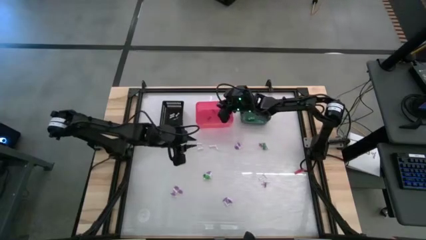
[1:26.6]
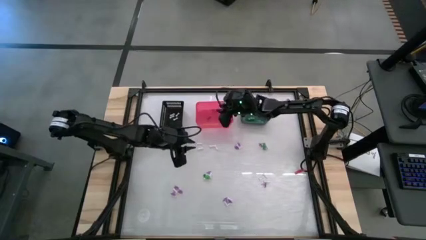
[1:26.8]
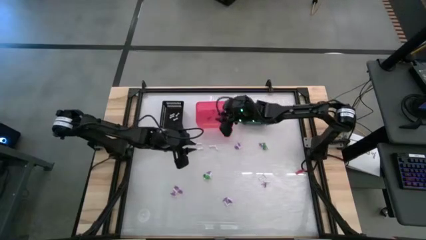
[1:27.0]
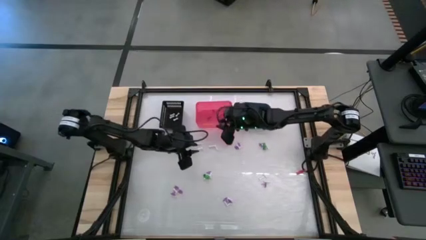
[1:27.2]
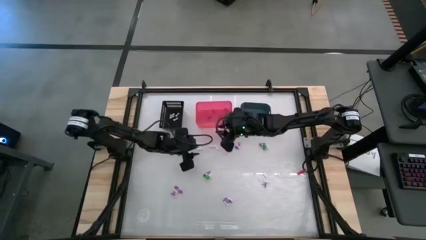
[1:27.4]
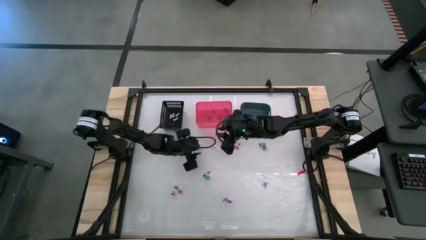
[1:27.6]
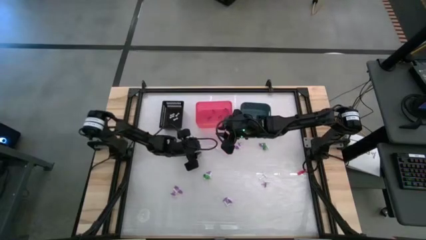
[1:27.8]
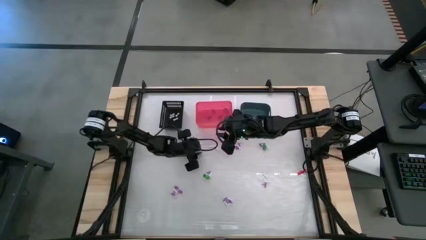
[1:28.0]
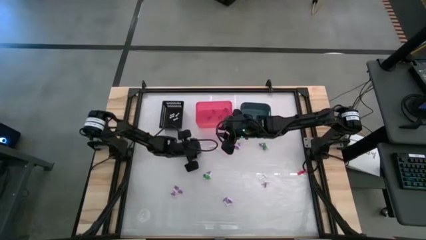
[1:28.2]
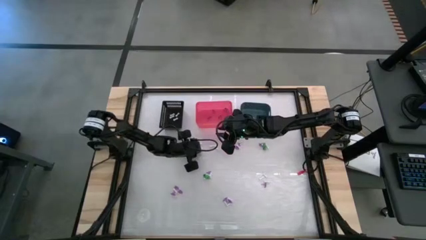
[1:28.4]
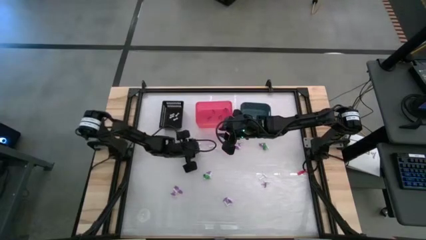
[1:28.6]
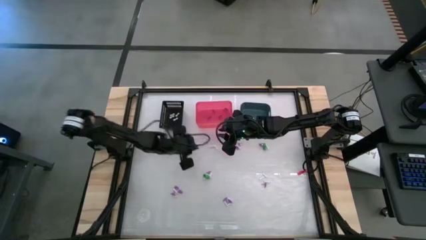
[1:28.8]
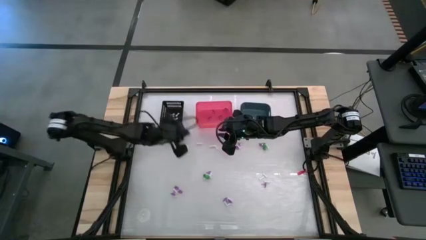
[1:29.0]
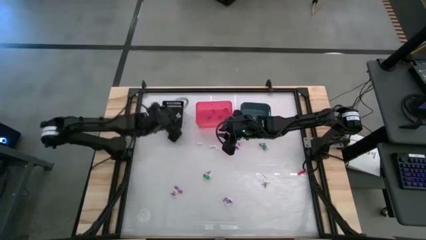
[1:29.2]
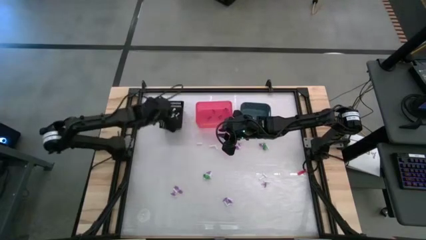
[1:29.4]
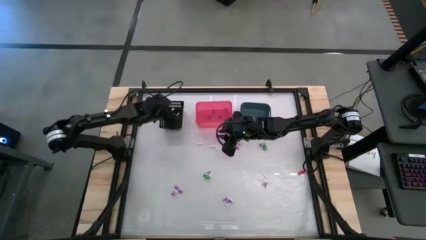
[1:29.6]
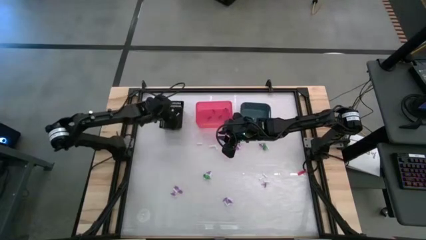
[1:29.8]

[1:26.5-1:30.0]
Task: Sort Halloween decoration
Put the white bone toy into the black bin

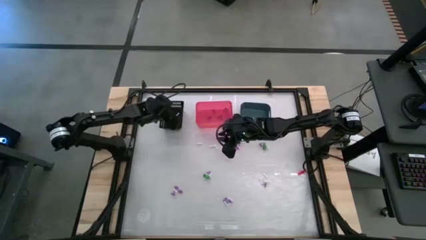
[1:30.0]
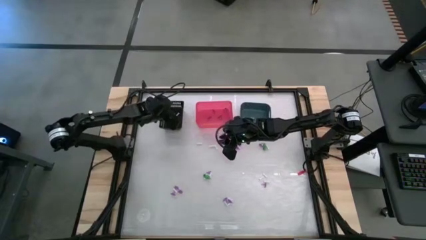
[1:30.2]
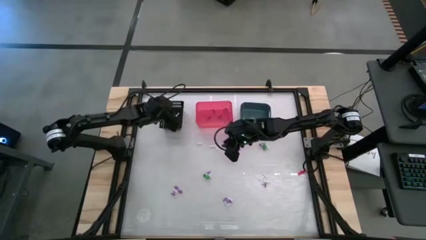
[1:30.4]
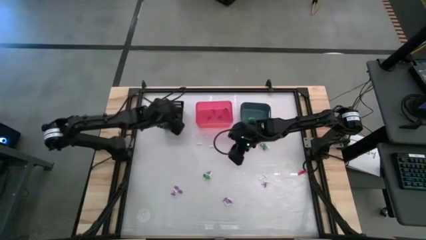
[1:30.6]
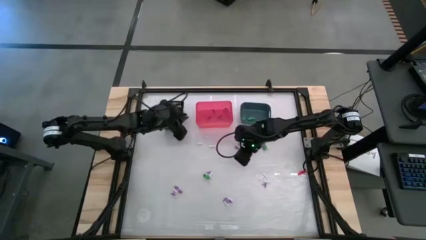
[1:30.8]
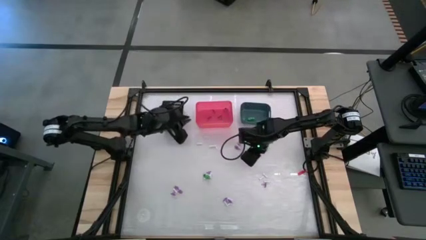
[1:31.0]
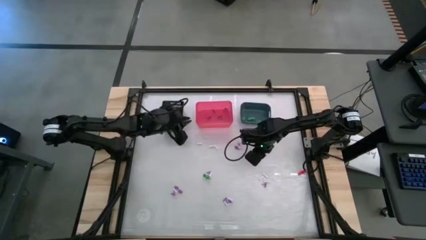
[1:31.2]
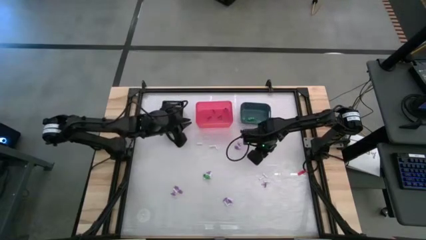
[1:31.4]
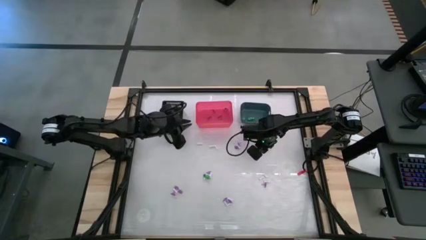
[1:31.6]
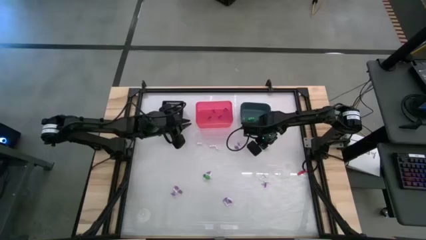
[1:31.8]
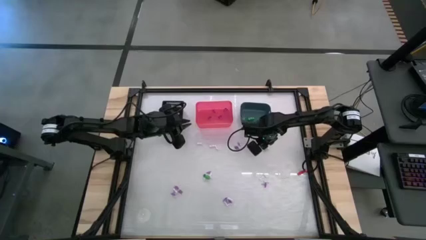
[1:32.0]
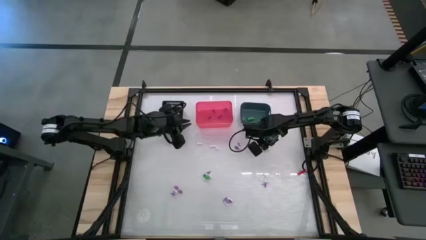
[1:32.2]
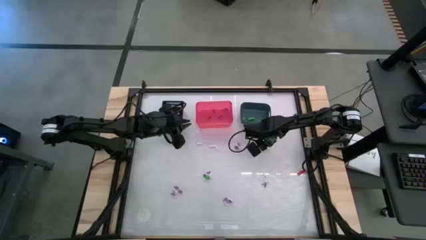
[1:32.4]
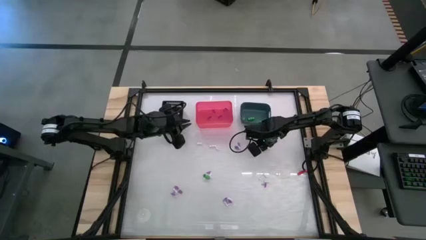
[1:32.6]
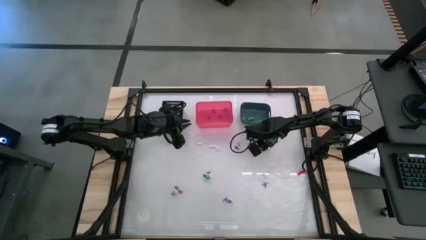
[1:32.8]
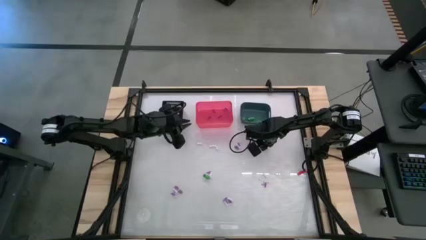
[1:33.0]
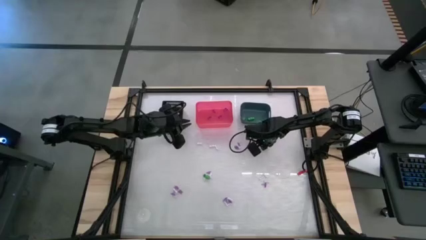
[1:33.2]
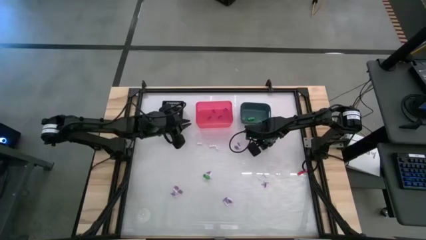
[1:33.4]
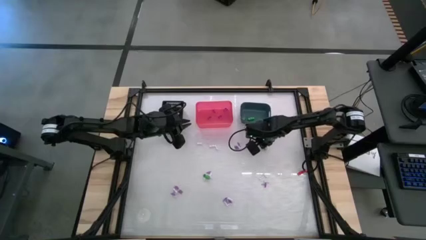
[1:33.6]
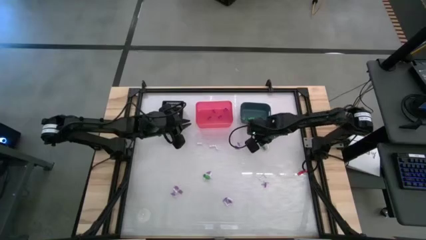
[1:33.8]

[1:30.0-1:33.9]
Put the green skeleton toy into the blue bin

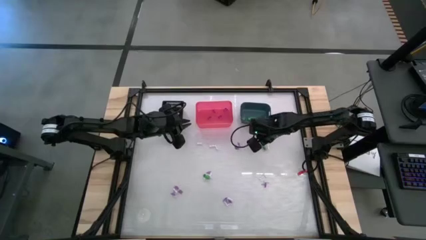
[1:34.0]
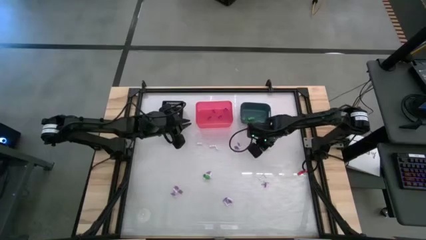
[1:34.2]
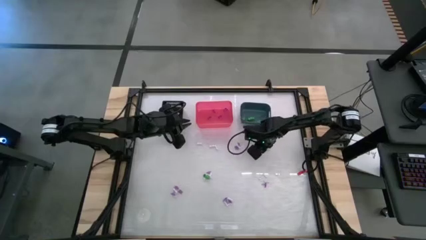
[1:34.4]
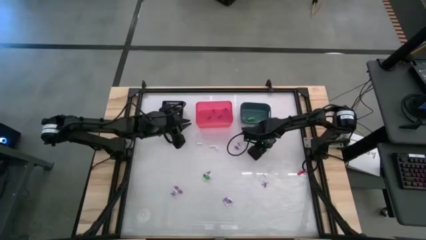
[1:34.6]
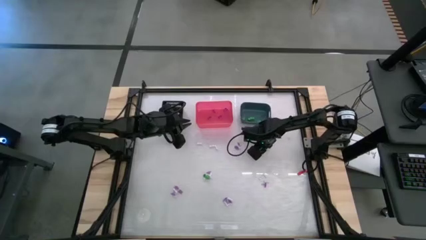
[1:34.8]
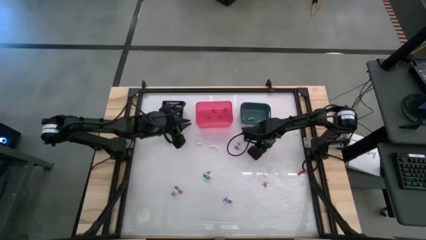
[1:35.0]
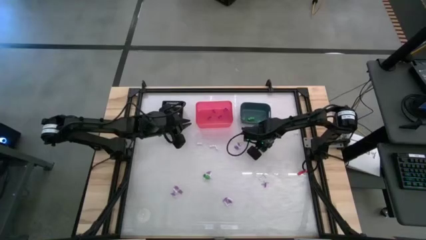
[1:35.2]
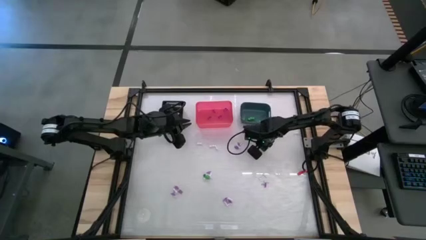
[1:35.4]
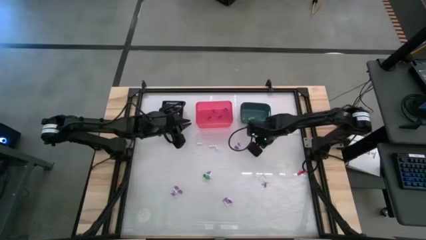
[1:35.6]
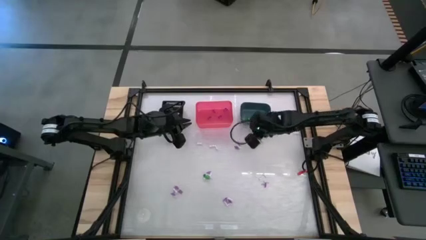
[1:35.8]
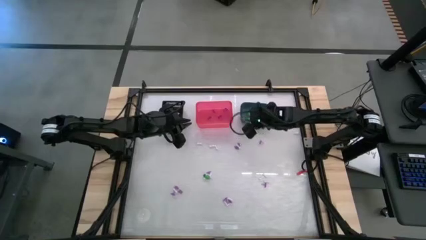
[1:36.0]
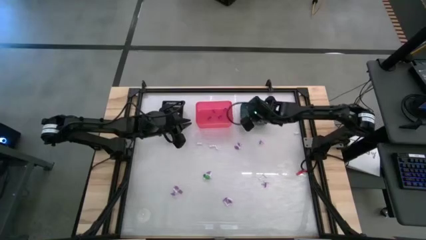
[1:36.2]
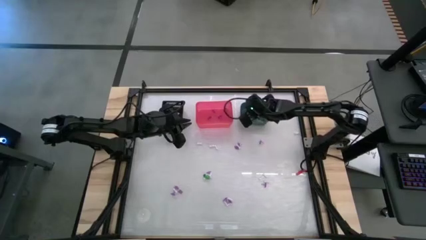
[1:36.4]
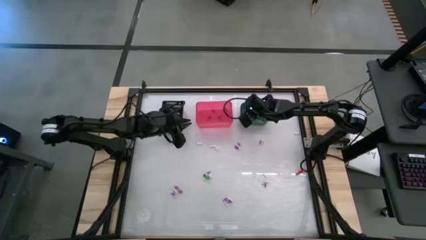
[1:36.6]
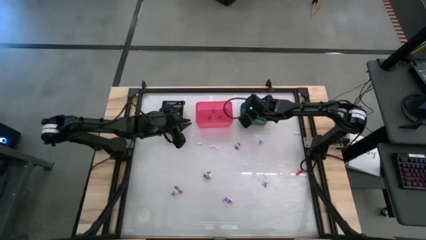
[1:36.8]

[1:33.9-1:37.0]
Put the green skeleton toy into the blue bin

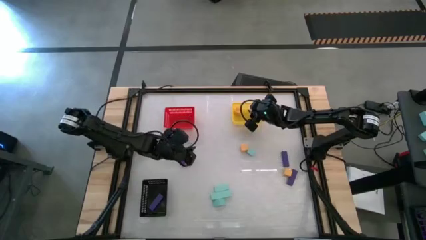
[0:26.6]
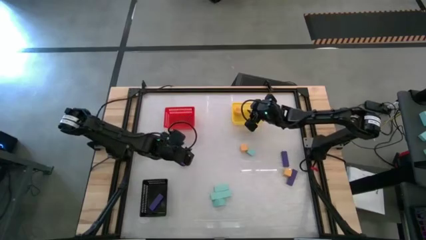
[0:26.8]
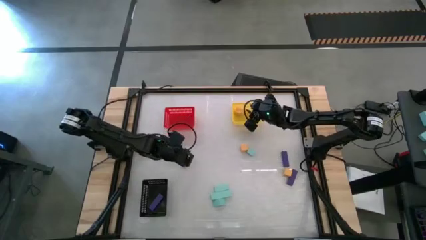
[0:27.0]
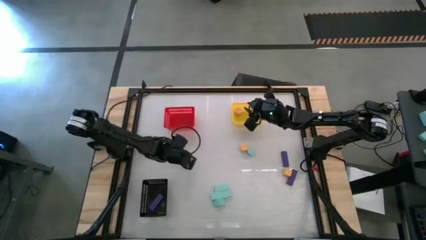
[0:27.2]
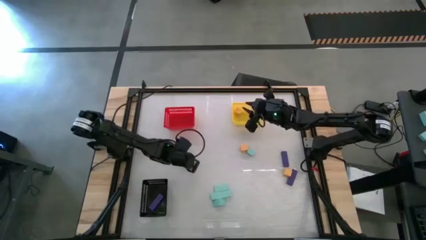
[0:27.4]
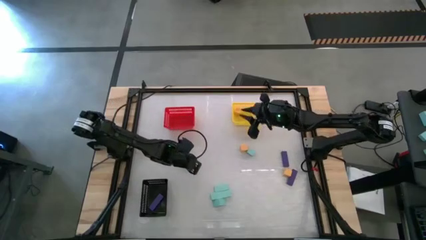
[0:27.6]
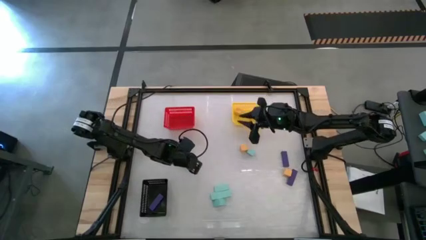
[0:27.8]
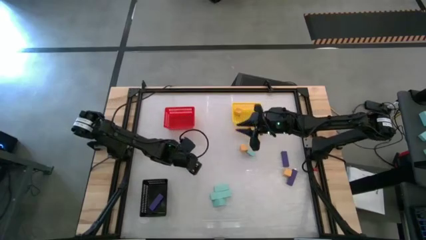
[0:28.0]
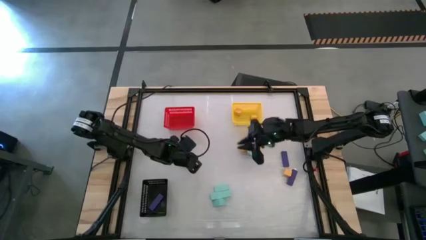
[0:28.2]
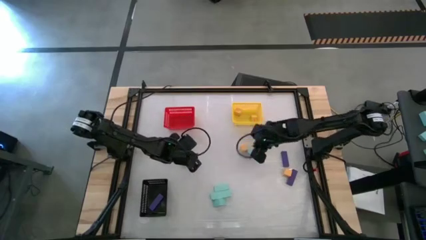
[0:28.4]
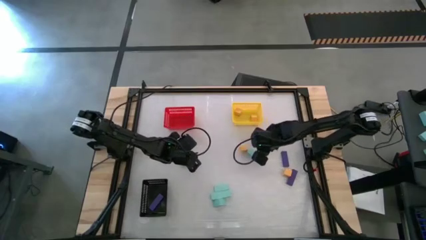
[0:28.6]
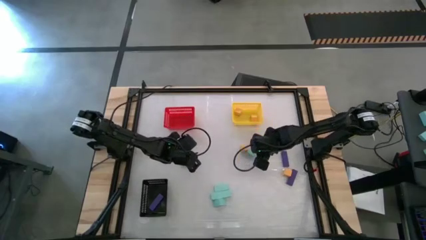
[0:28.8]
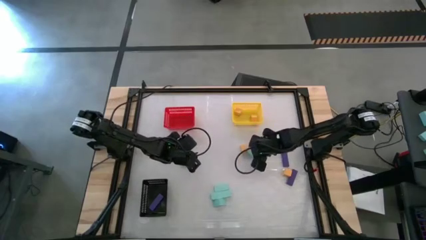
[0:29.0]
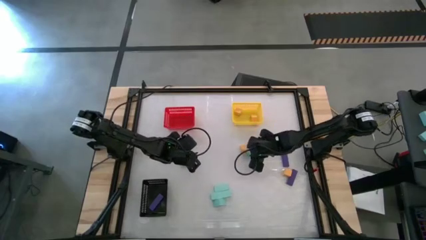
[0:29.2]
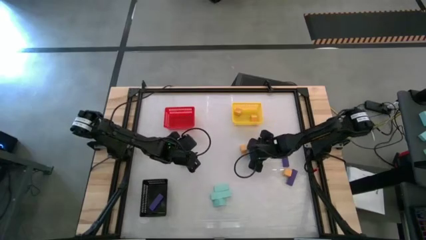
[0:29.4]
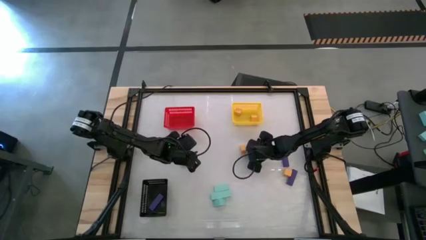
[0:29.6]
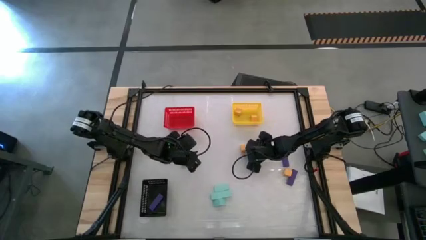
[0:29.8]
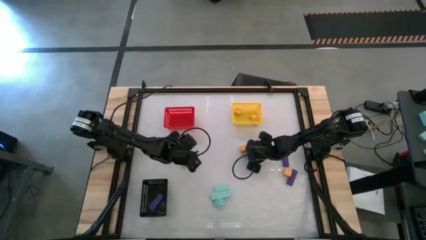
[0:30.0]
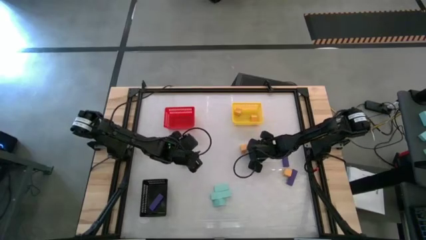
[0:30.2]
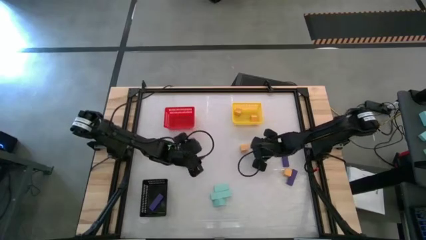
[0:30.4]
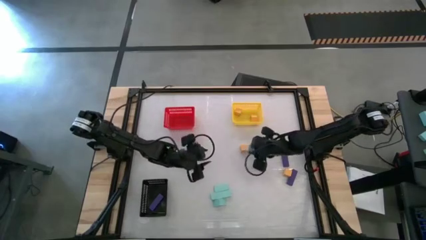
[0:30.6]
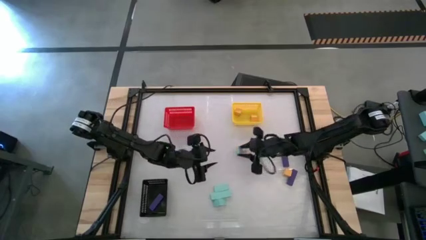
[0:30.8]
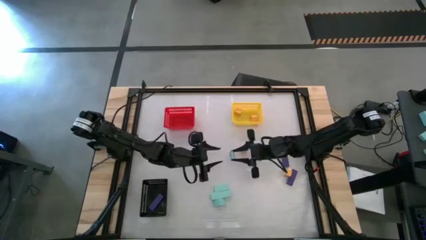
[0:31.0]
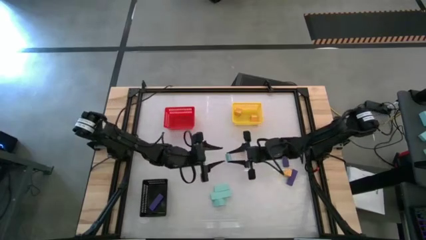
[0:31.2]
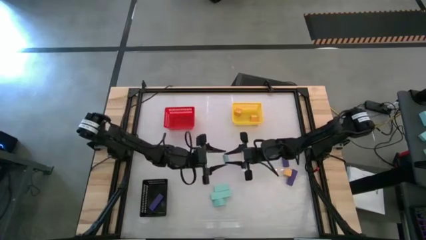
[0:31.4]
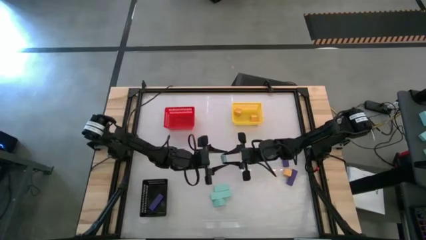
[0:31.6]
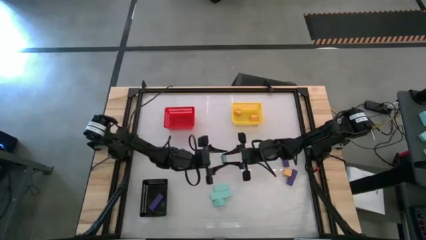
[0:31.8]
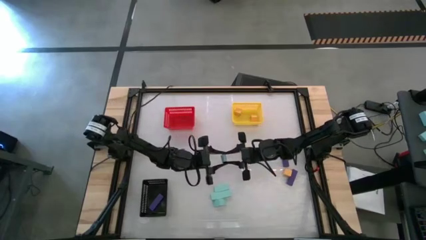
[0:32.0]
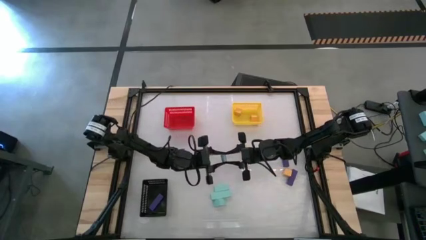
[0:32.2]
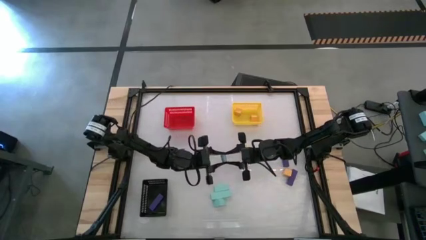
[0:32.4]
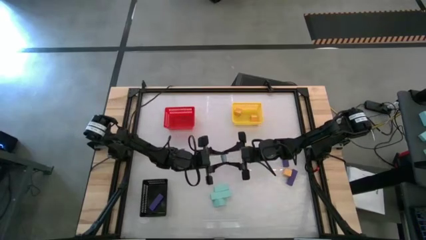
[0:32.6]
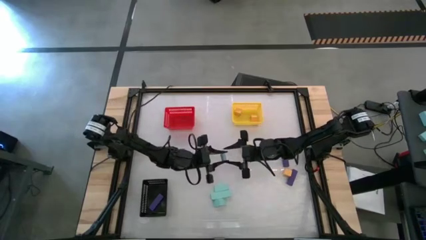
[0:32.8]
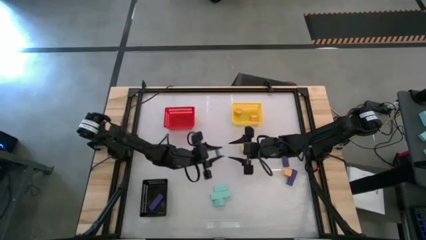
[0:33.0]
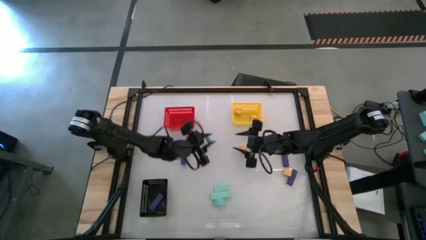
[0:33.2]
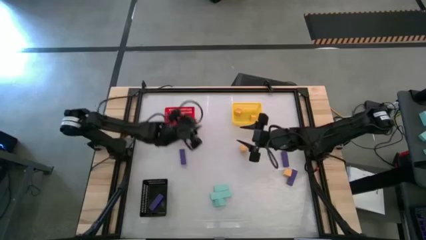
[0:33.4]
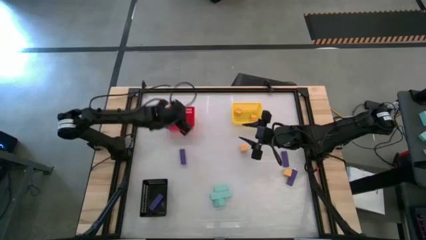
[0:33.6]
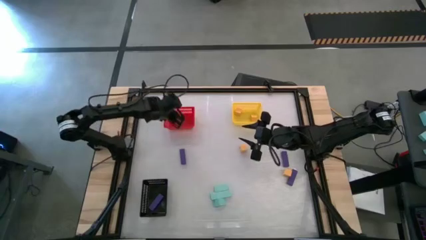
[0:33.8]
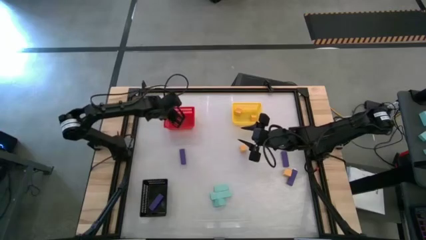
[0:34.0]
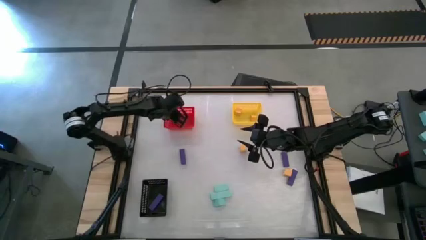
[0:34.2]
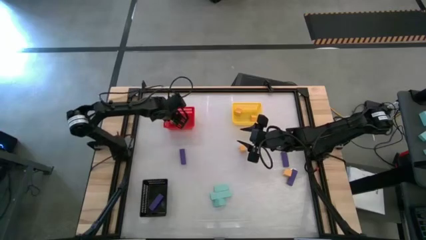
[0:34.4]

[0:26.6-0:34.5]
Task: Sort & place blocks by color
Put the light blue block into the red bin
